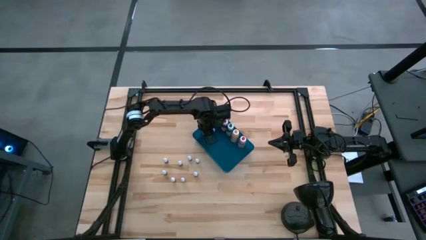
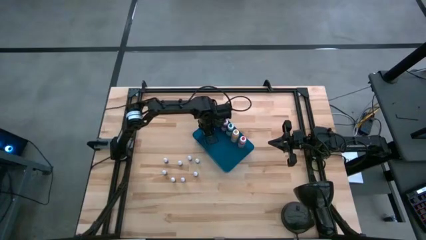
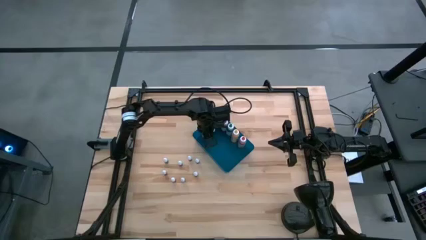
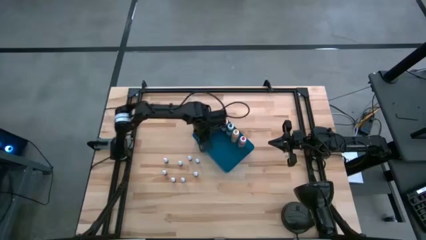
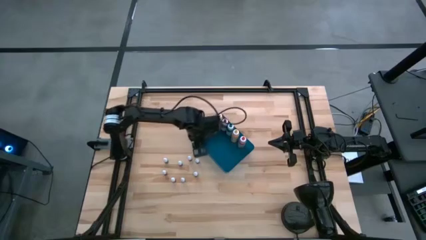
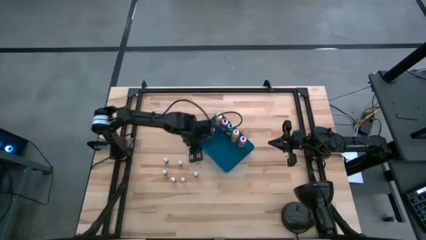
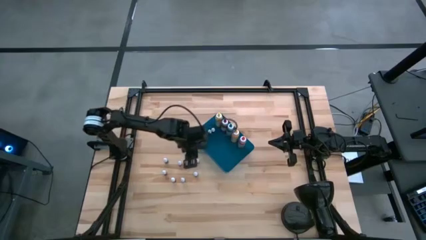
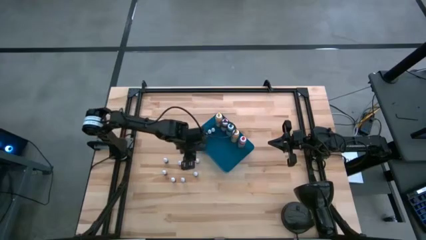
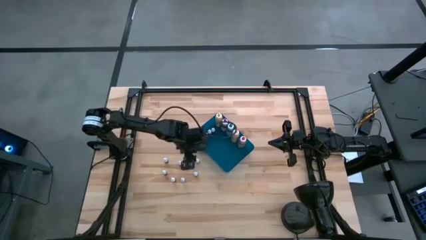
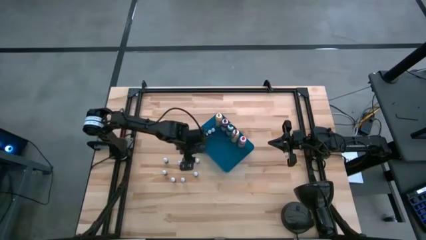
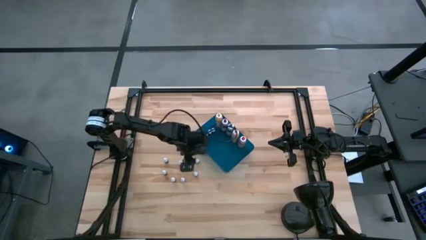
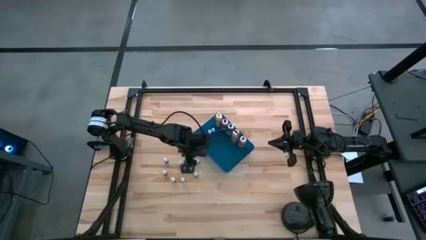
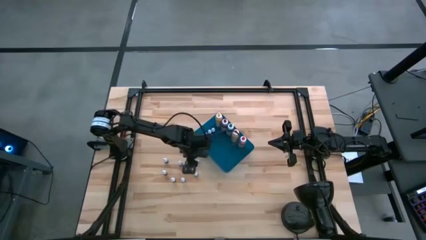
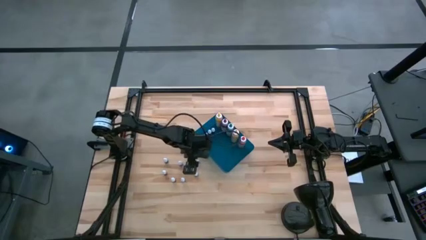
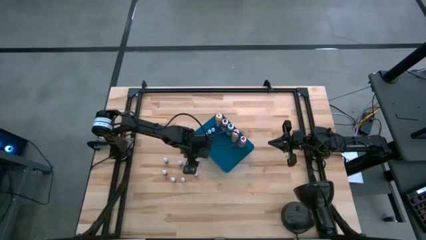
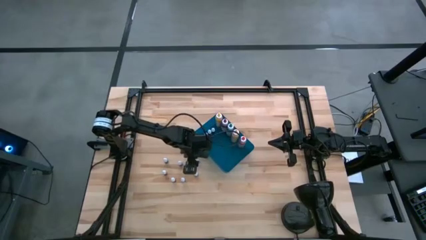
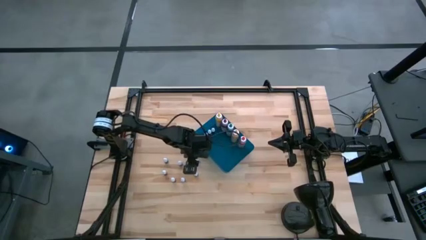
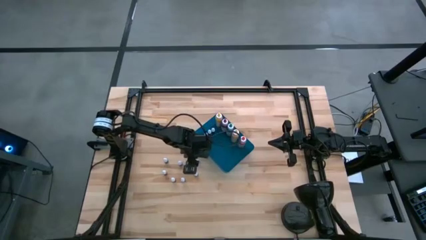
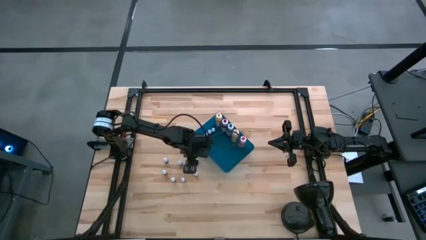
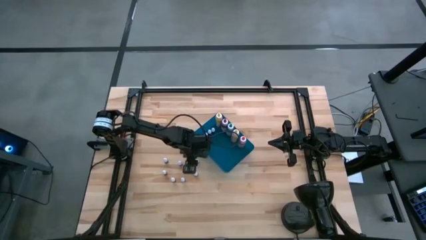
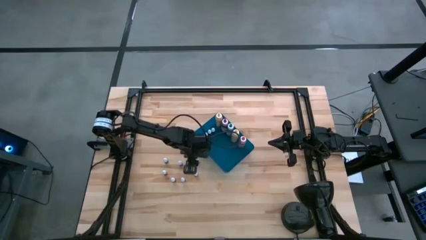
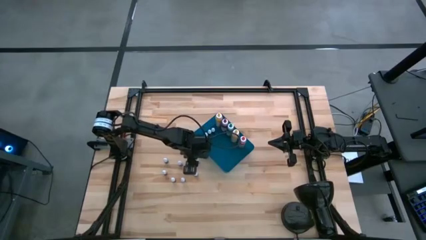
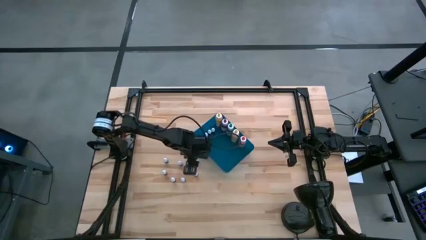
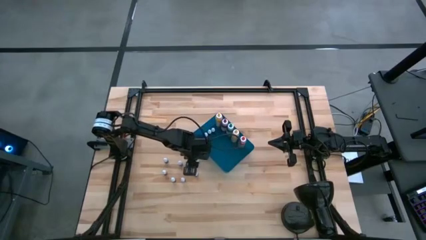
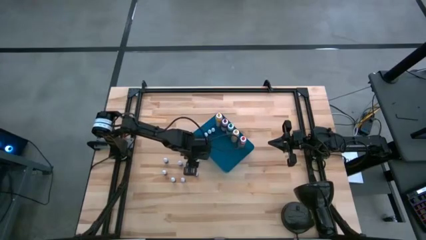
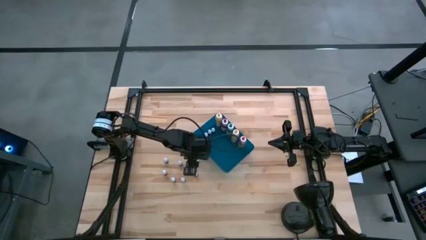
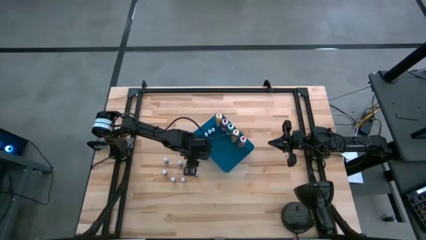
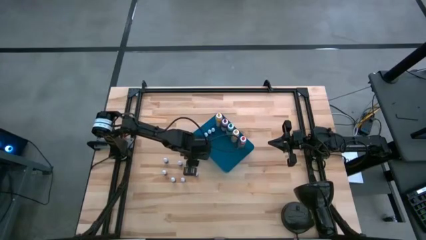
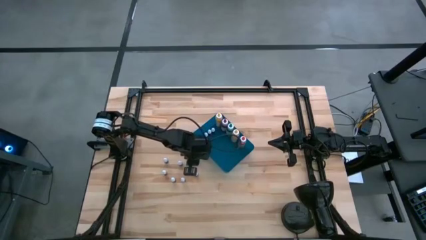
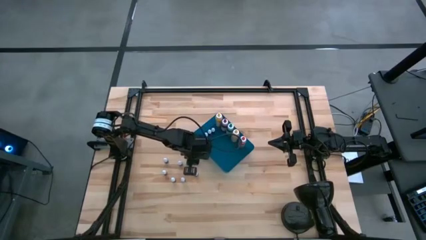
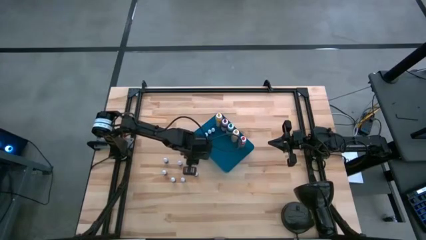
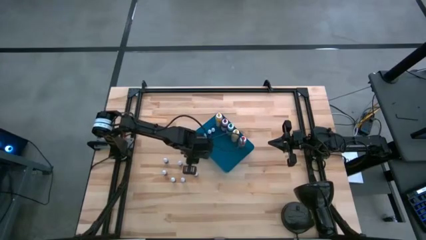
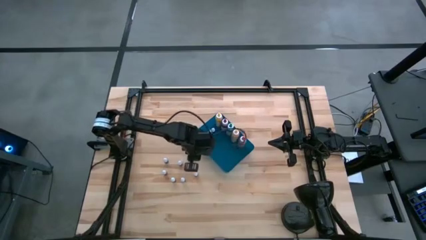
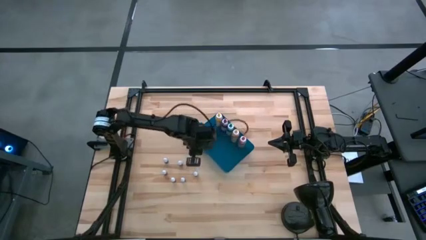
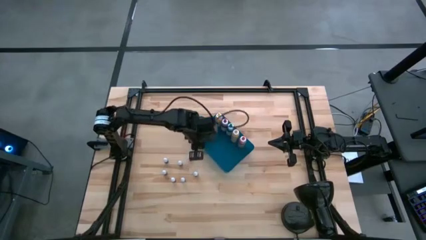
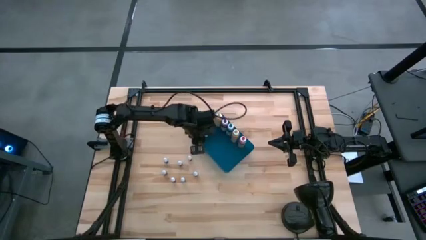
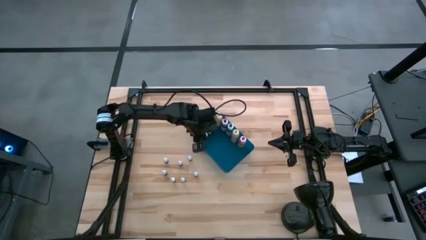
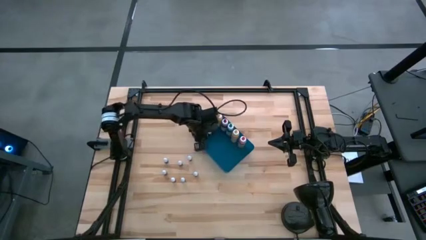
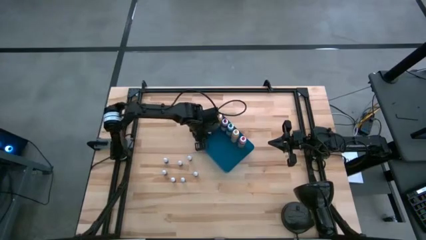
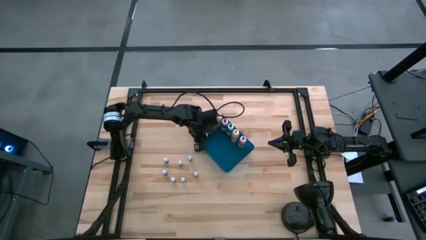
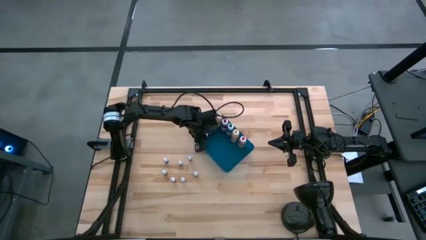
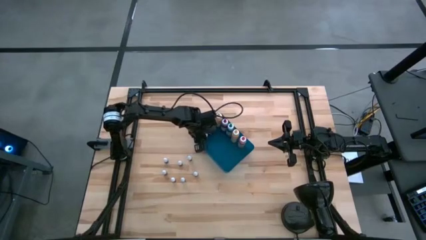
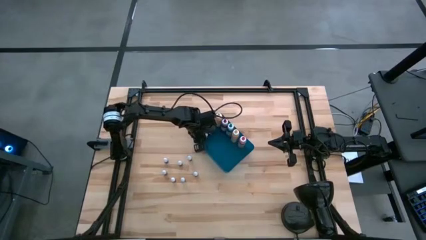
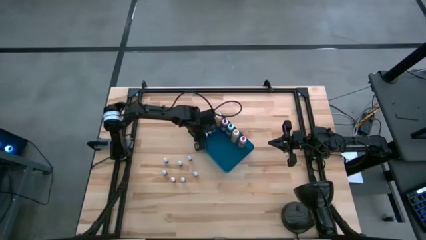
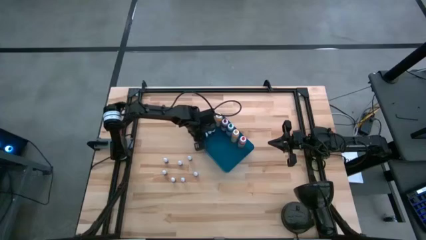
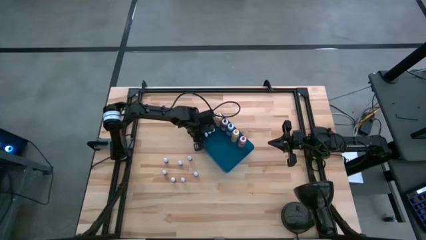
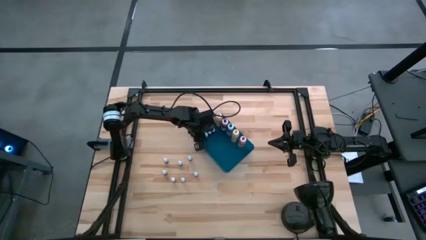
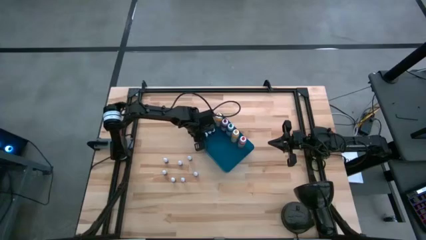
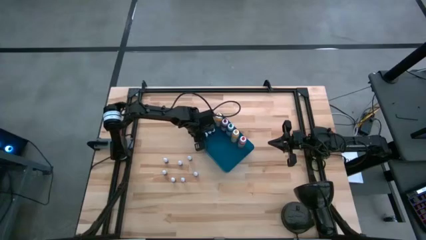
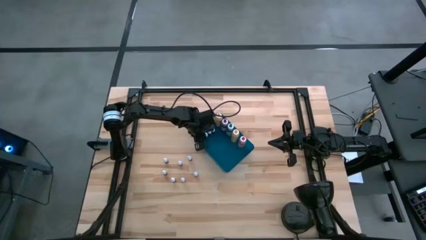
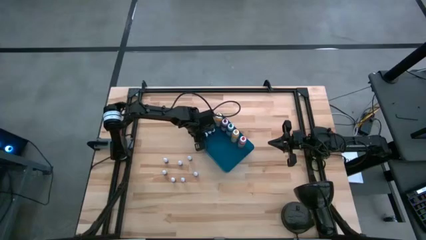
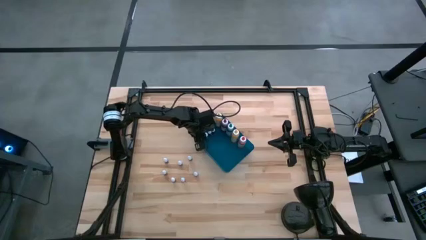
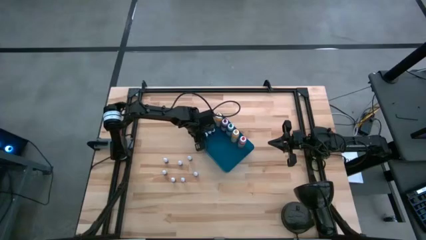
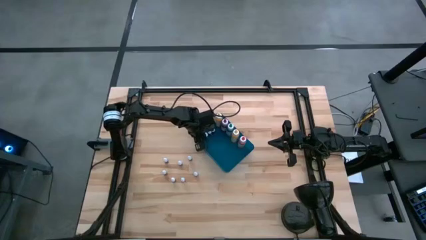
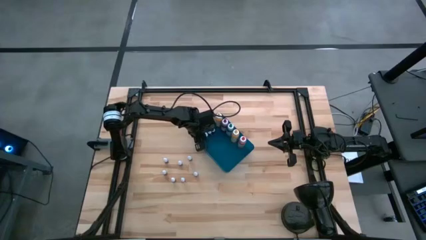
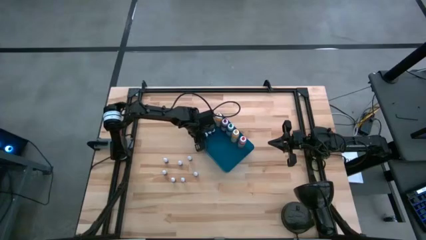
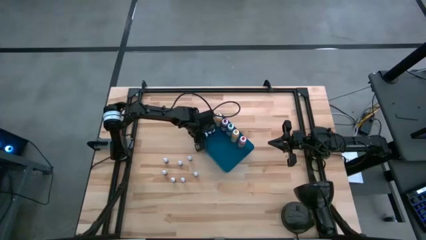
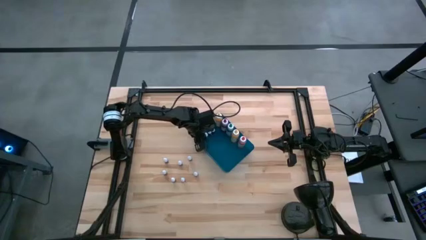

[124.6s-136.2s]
Task: Pick & Place food coloring
Put the green food coloring bottle into the blue bin

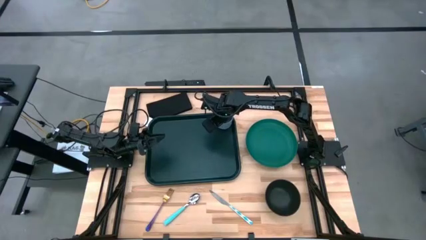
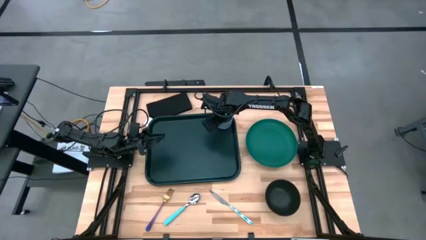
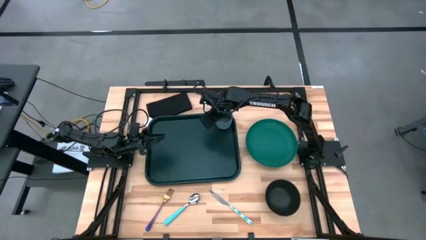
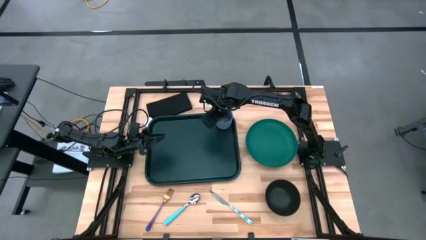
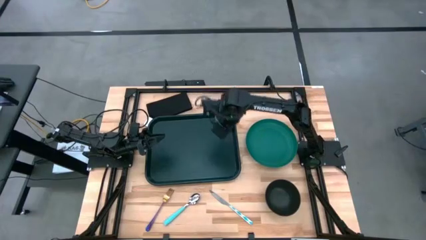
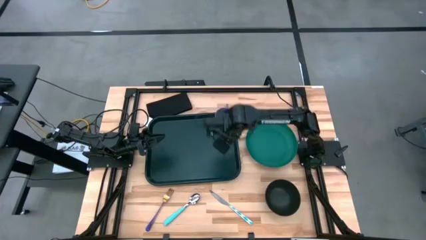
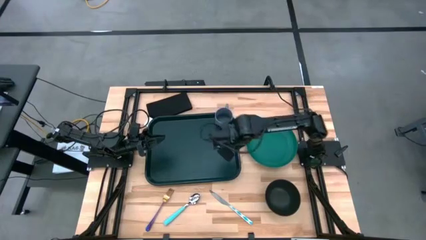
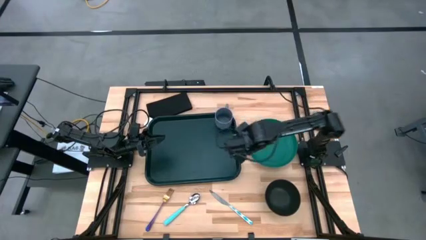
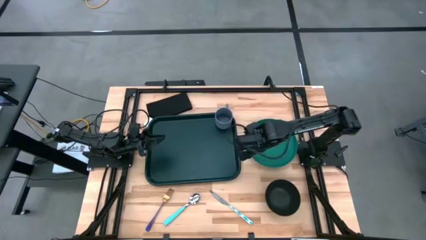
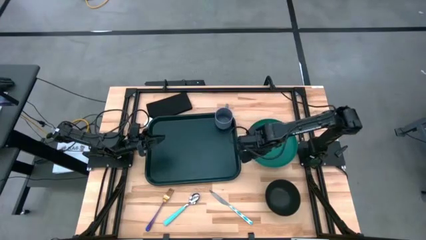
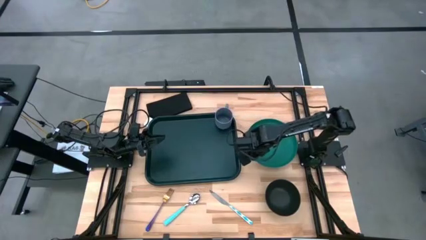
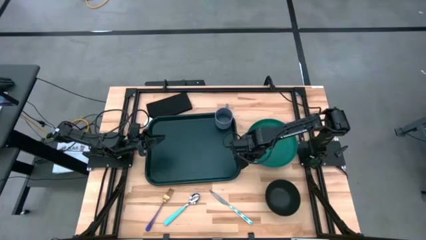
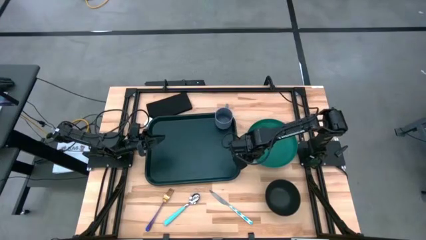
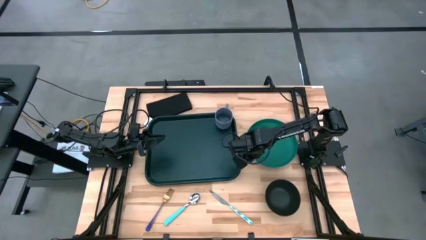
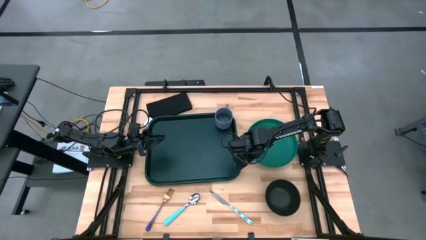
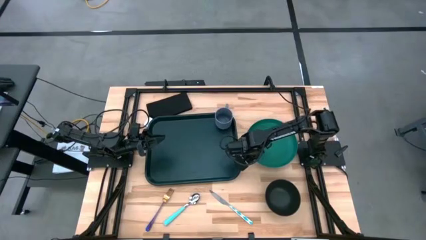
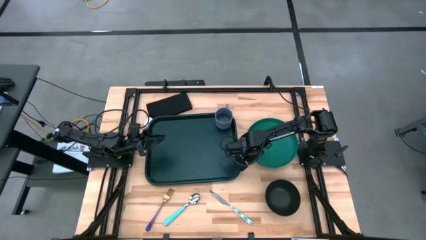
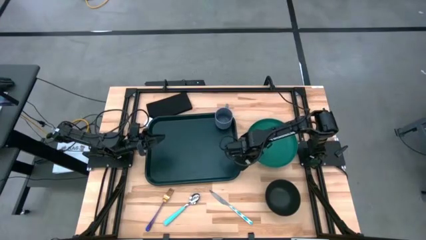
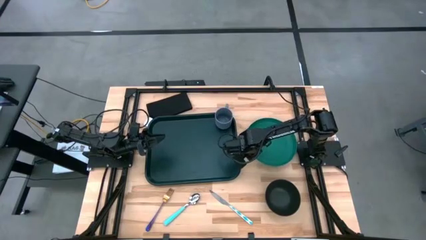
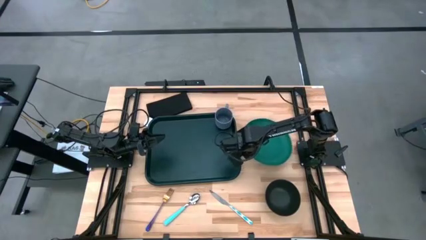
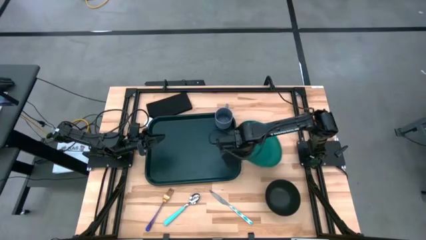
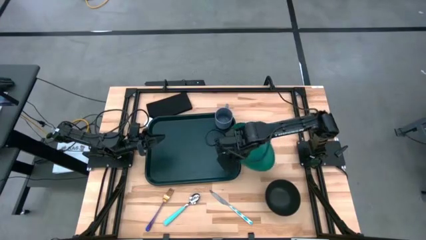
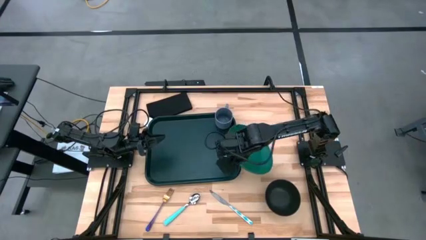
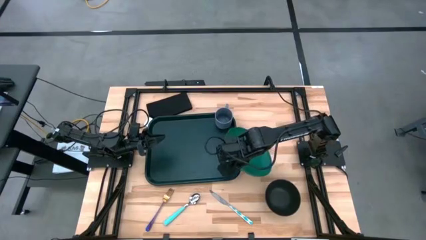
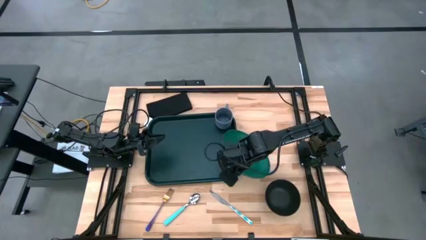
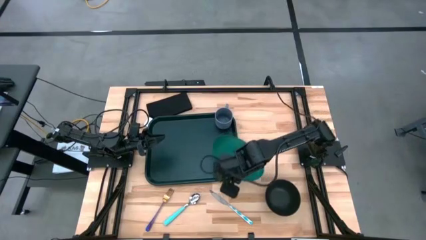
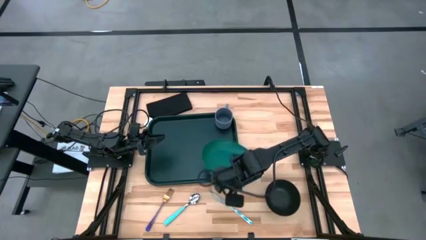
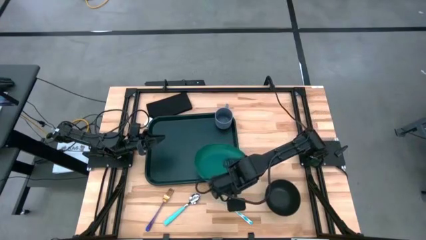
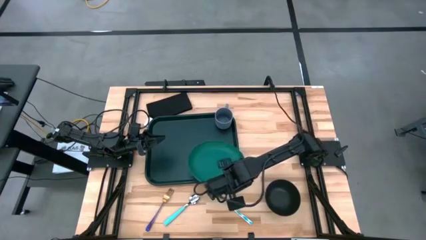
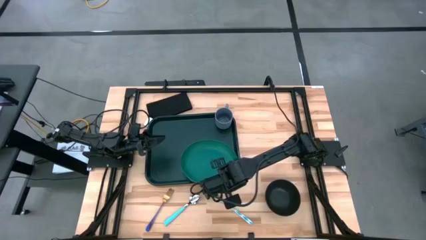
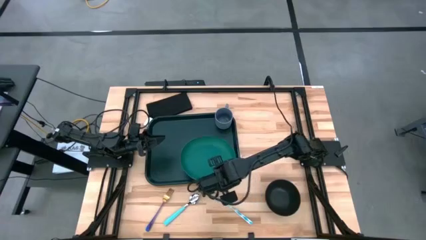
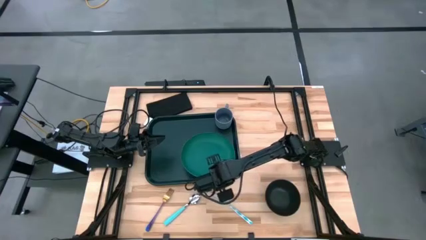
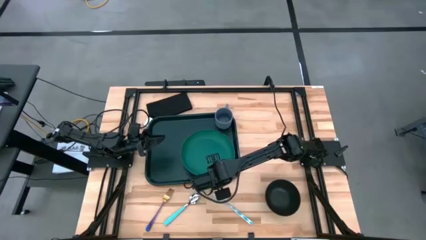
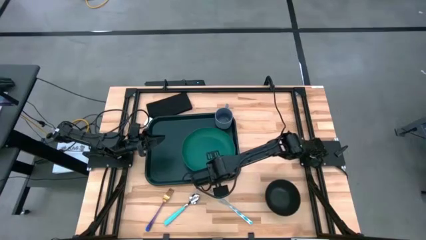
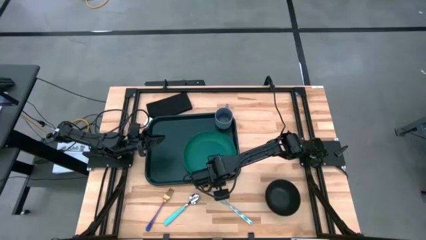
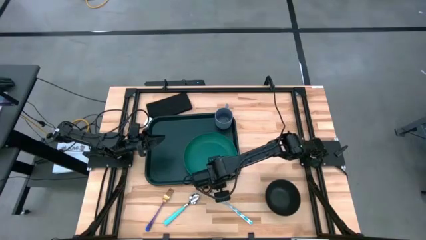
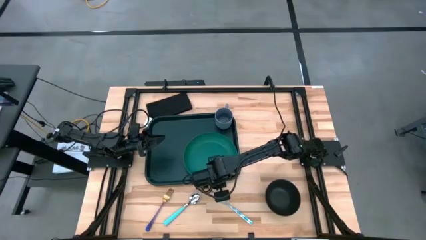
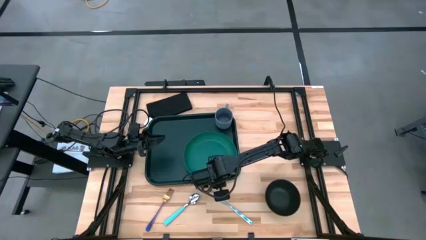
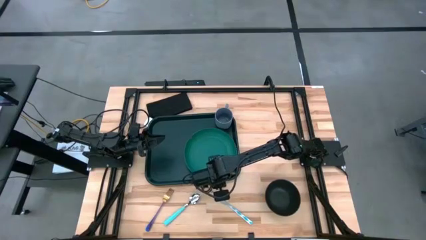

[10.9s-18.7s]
Task: Set up tray
Put the green plate on the black tray
